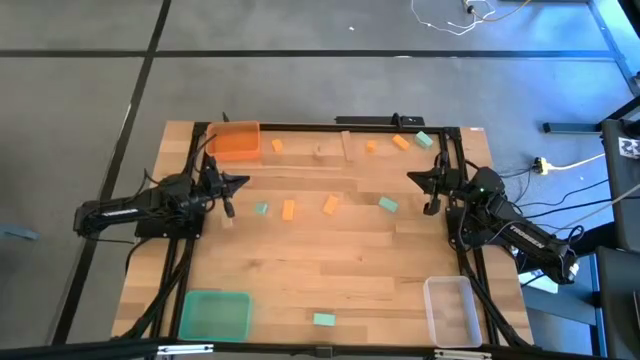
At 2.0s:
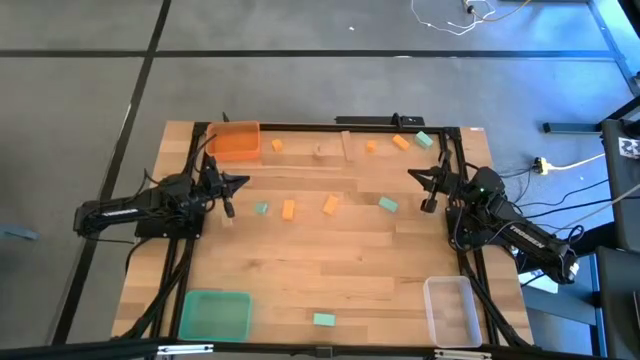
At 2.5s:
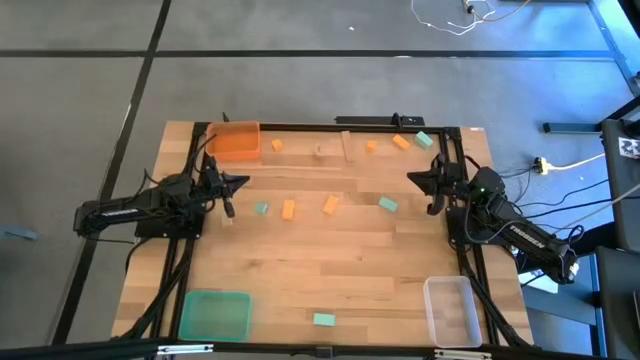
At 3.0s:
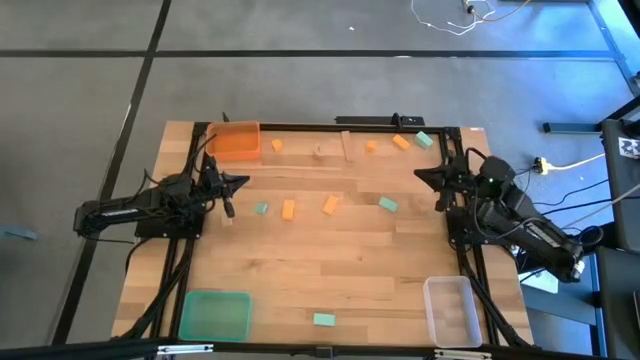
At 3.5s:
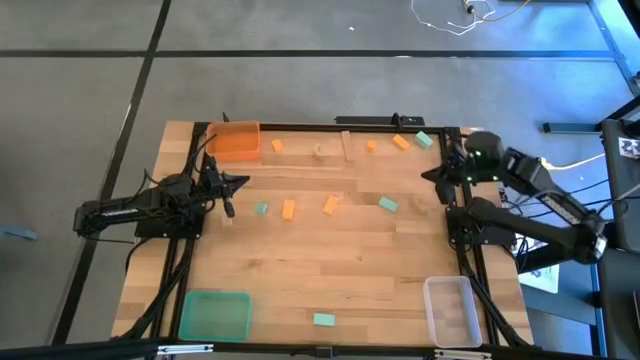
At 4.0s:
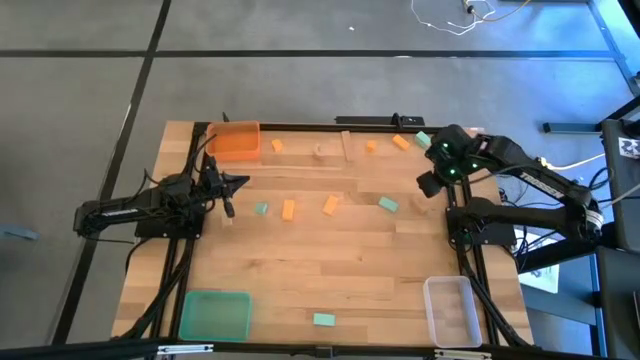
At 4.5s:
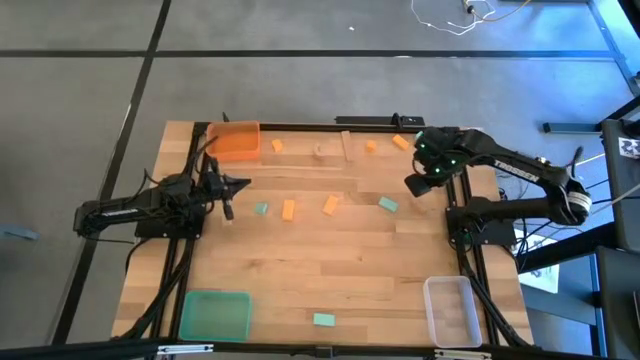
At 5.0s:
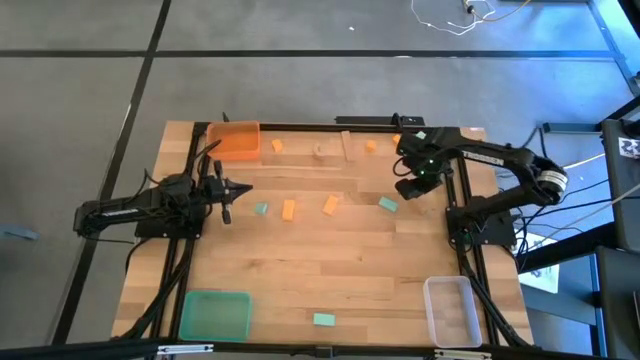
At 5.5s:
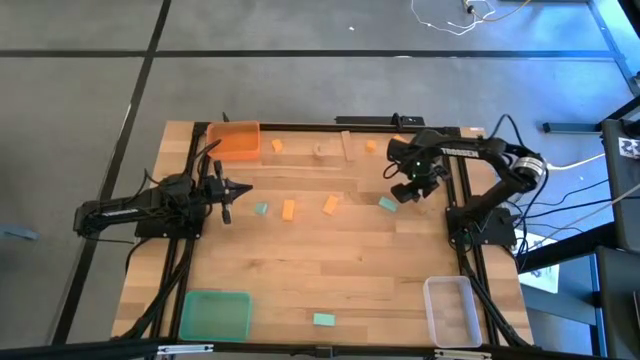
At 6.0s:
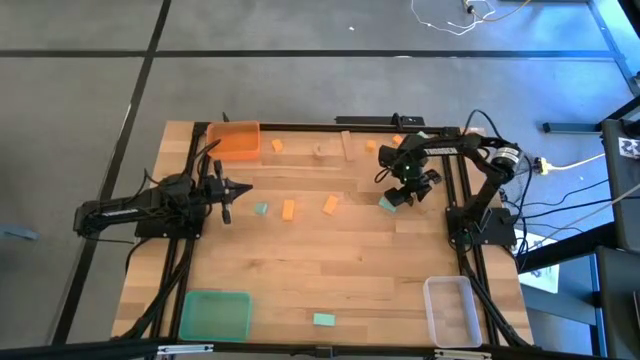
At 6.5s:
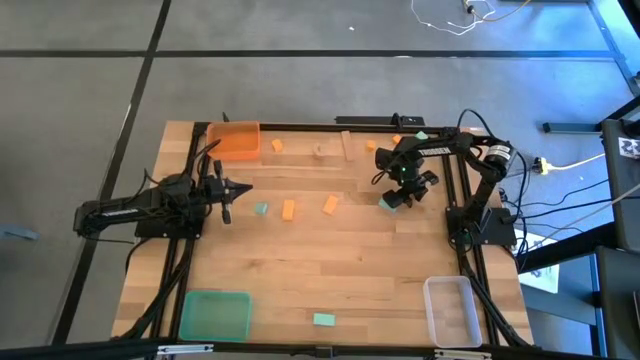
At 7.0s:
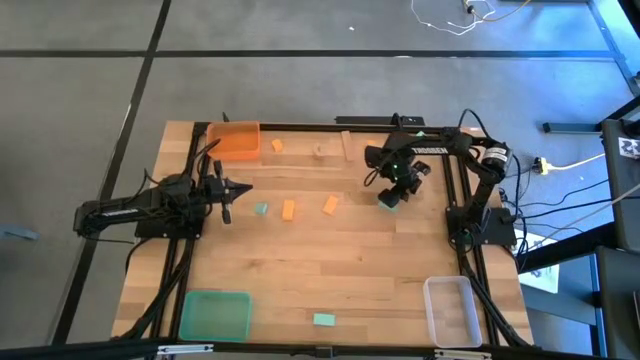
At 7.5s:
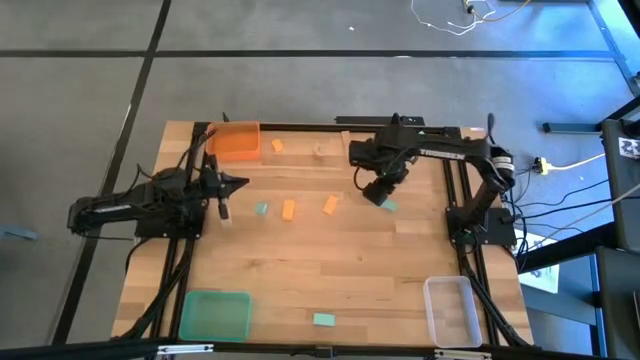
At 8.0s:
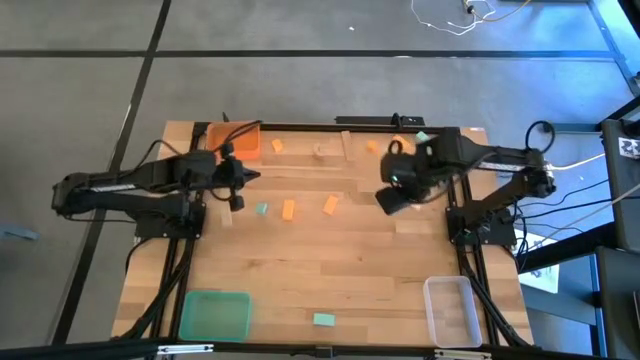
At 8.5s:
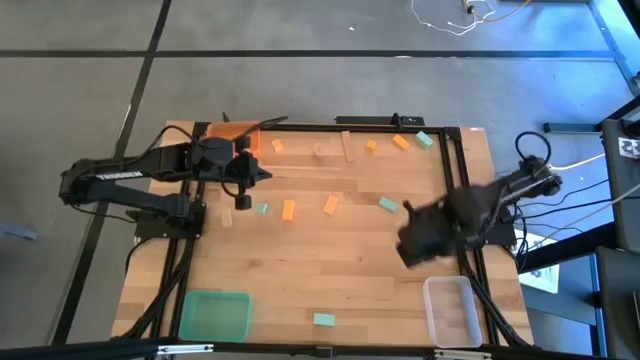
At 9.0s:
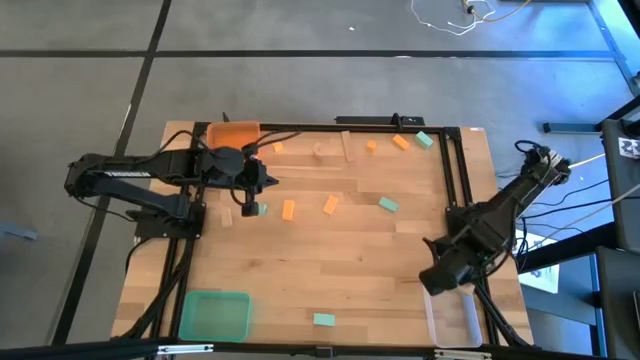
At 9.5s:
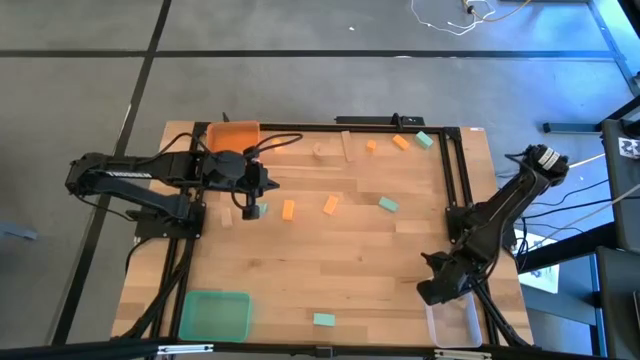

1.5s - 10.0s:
Task: Sort & place blocks by color
Put the brown block into the transparent bin

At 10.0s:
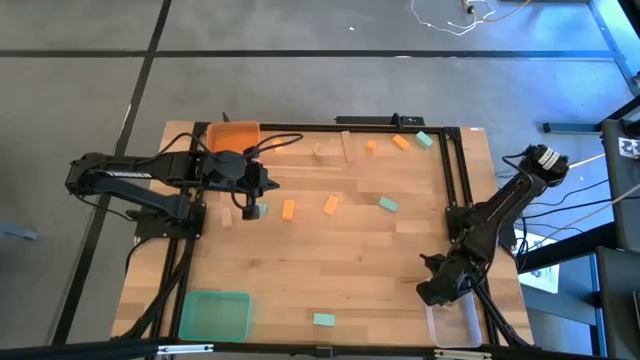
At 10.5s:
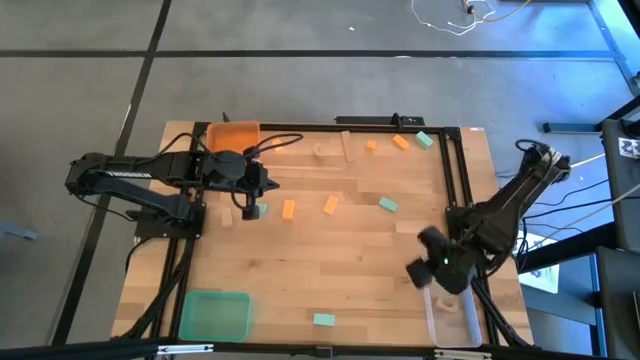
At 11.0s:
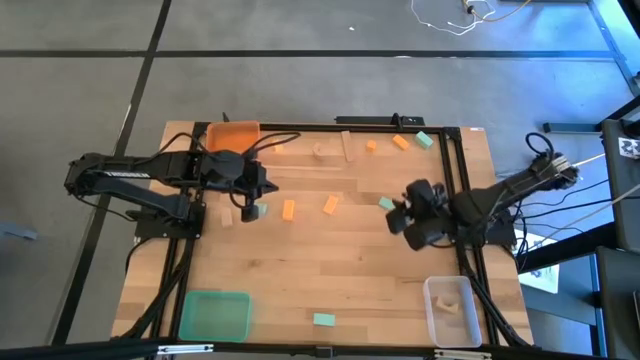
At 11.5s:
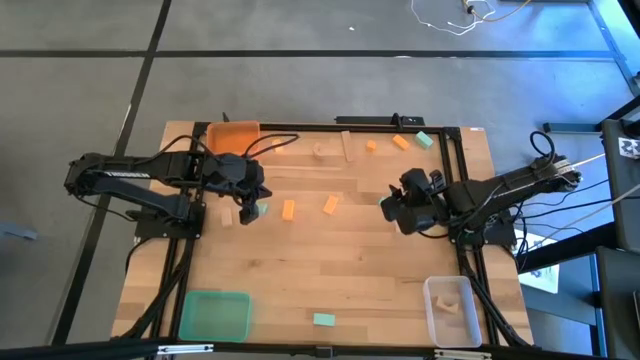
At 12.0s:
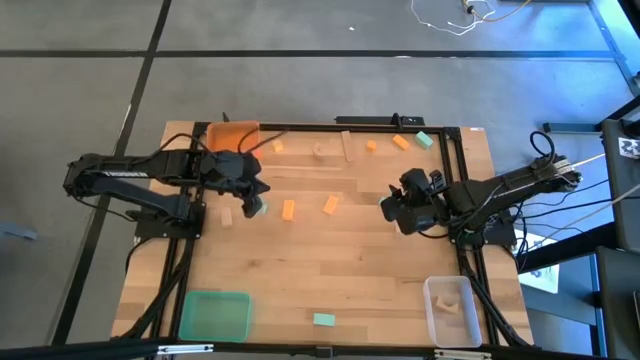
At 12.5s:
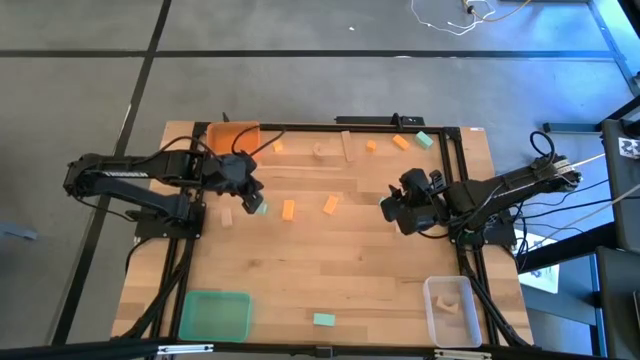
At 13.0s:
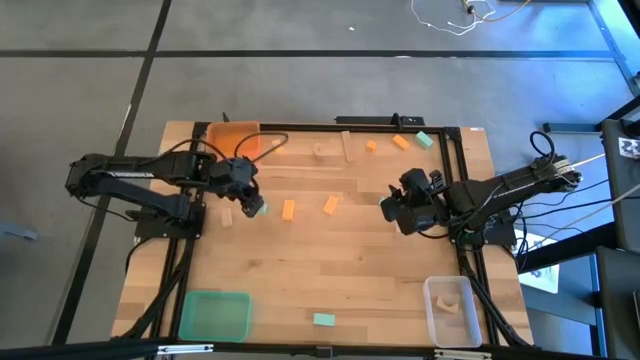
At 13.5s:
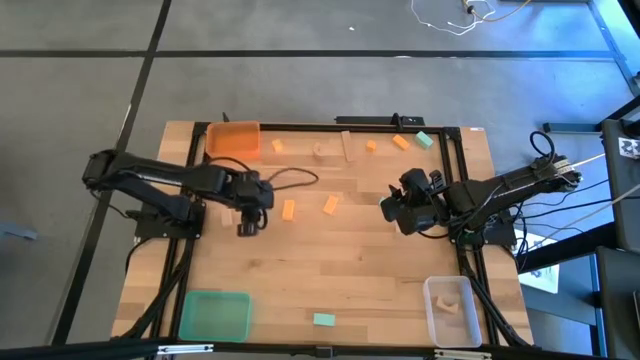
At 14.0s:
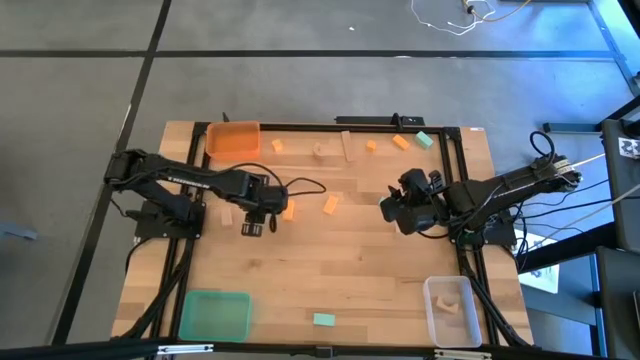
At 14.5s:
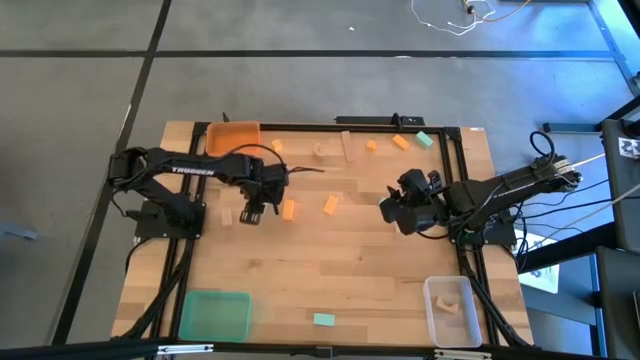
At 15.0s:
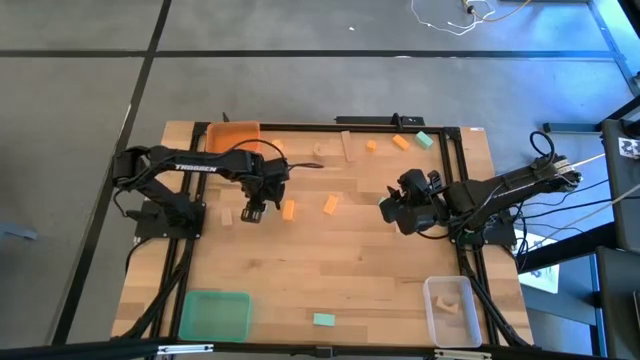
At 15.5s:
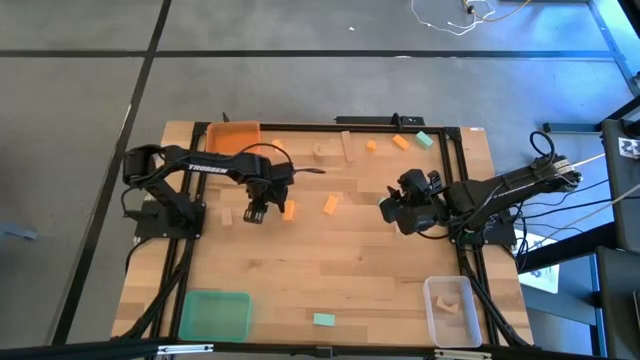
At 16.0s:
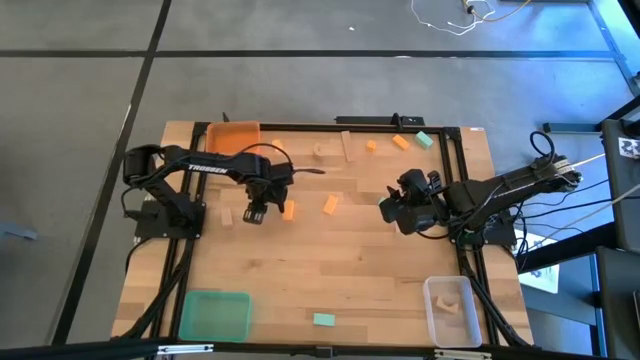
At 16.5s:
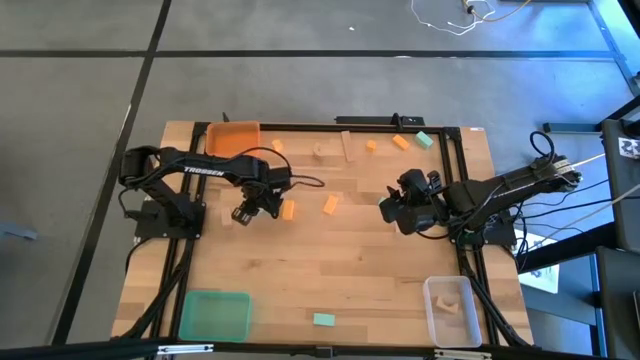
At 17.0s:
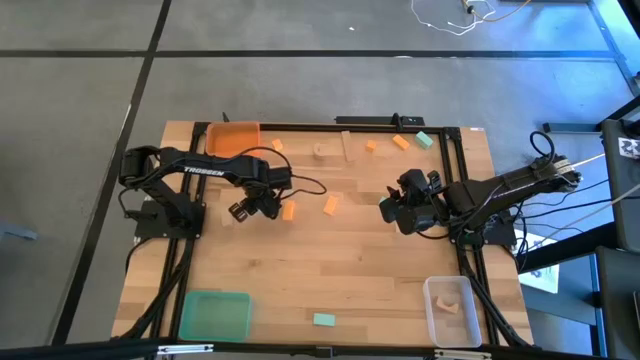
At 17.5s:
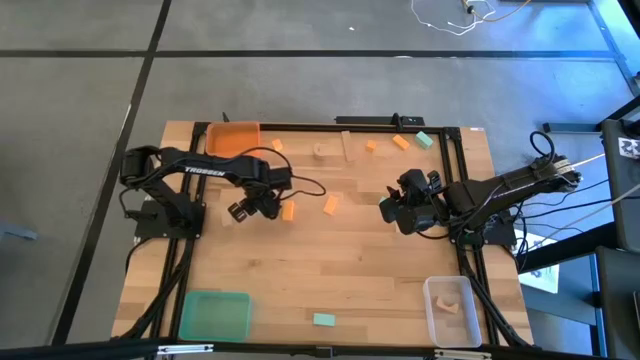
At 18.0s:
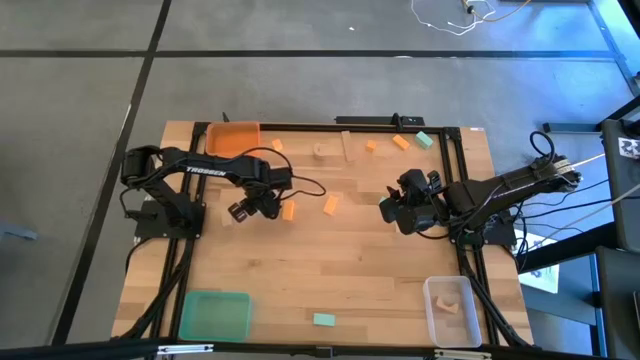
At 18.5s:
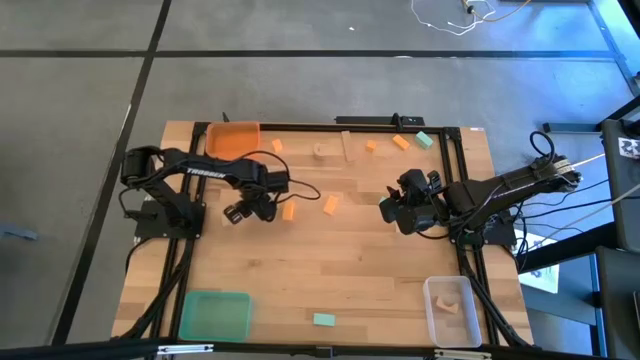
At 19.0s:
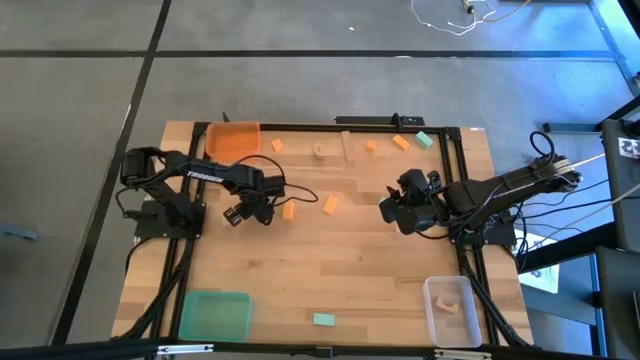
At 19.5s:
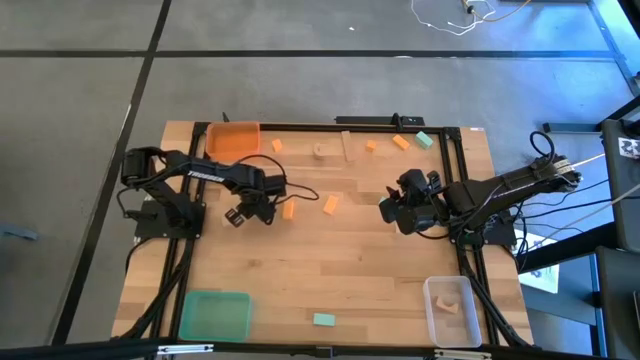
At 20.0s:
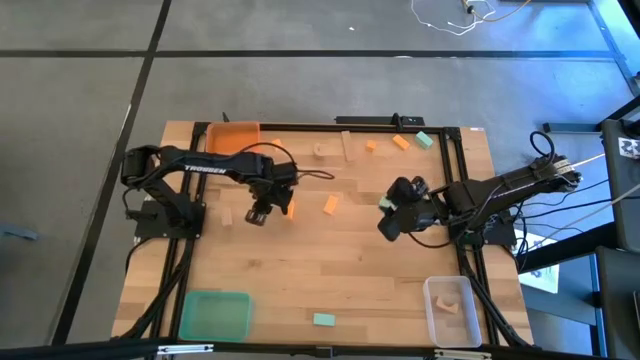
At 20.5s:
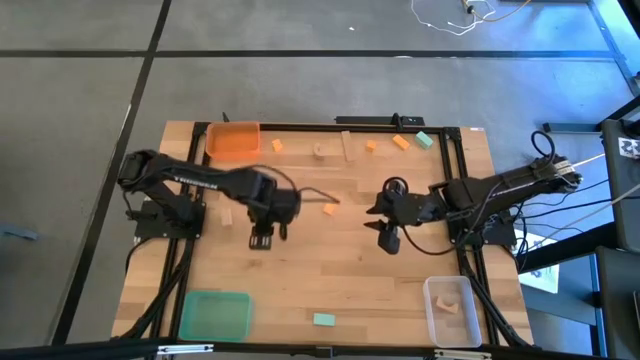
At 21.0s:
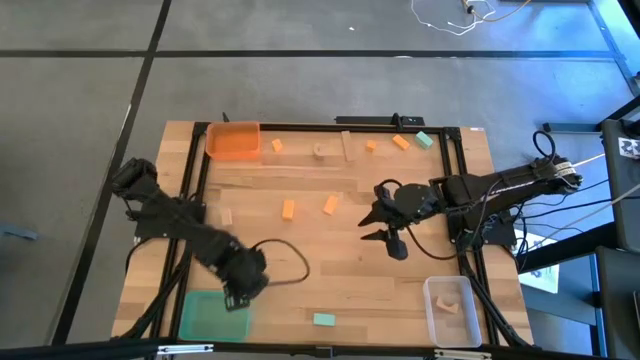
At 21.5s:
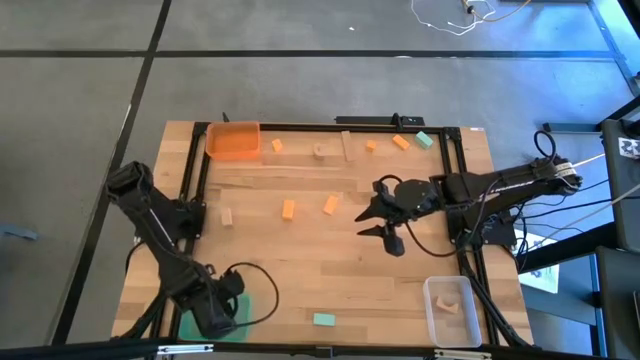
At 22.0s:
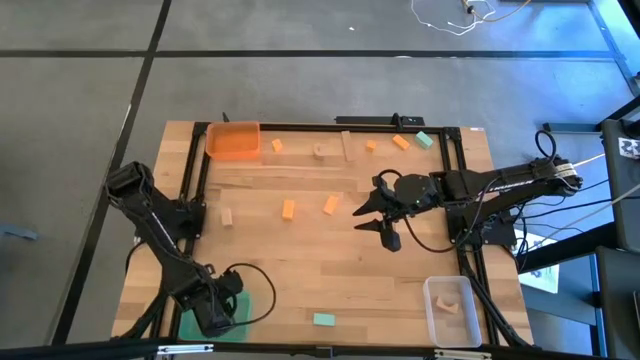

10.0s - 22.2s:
Put the blue block into the blue bin
